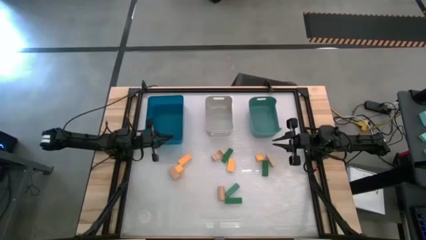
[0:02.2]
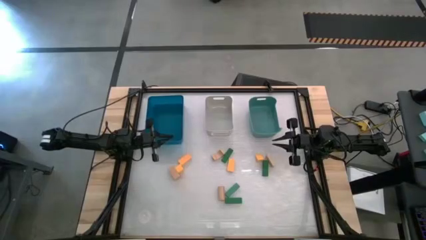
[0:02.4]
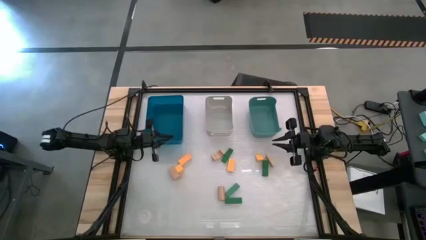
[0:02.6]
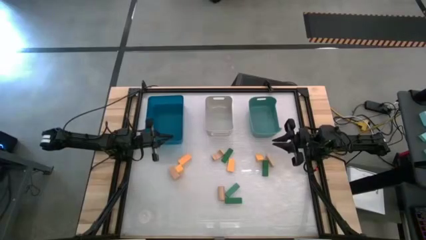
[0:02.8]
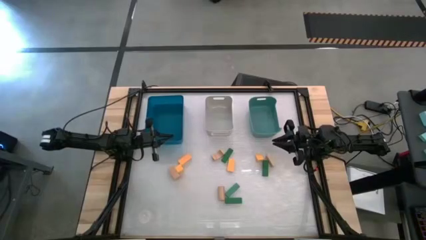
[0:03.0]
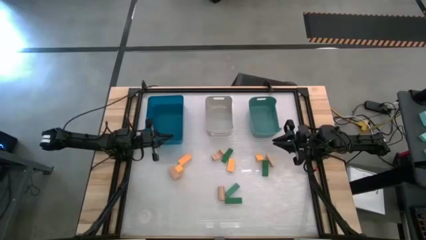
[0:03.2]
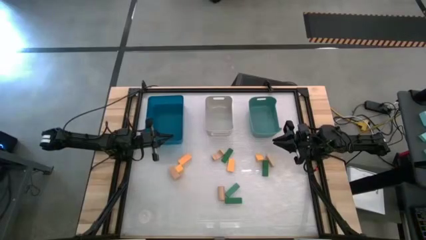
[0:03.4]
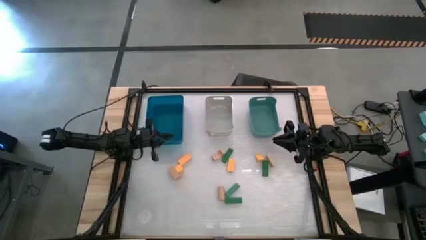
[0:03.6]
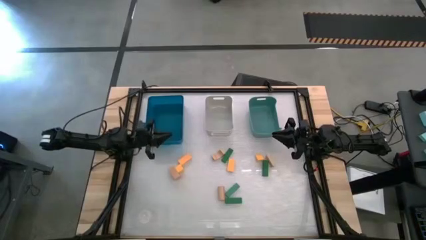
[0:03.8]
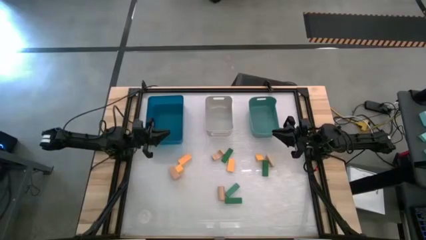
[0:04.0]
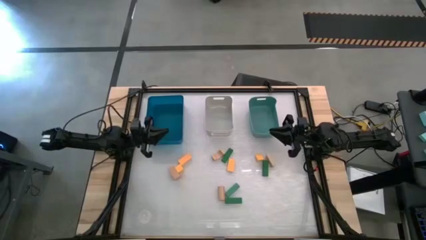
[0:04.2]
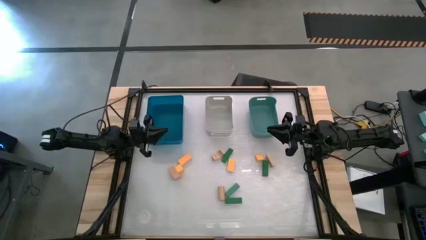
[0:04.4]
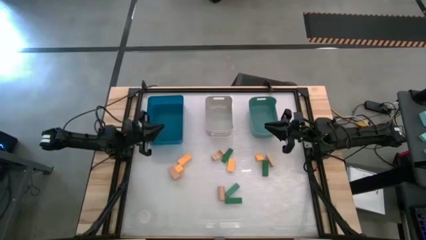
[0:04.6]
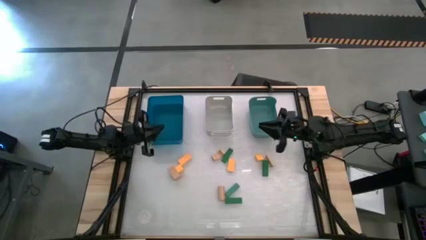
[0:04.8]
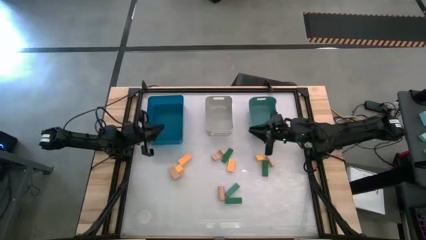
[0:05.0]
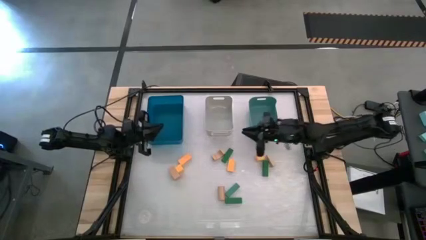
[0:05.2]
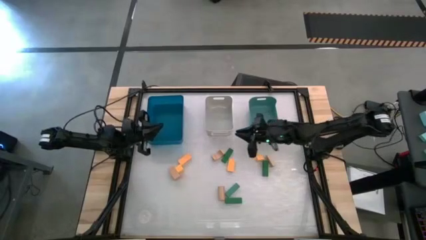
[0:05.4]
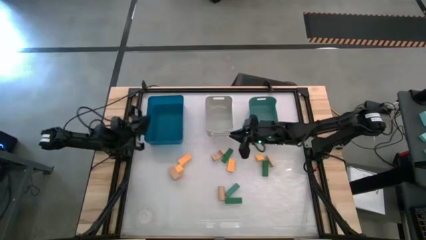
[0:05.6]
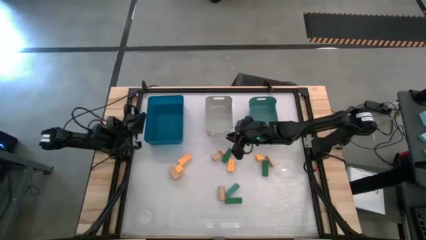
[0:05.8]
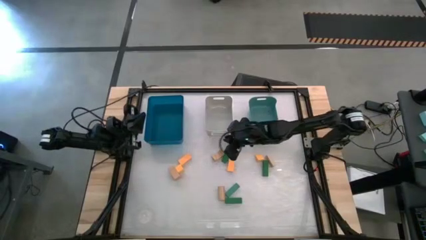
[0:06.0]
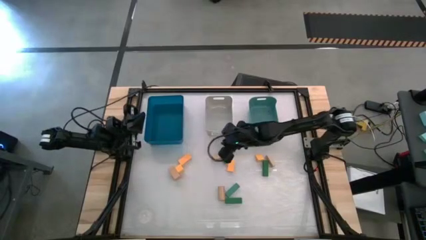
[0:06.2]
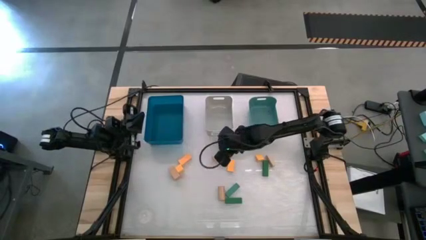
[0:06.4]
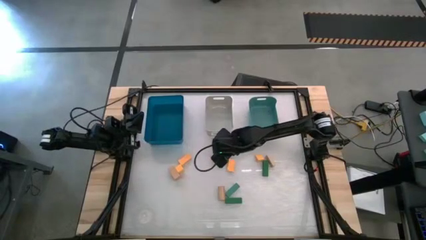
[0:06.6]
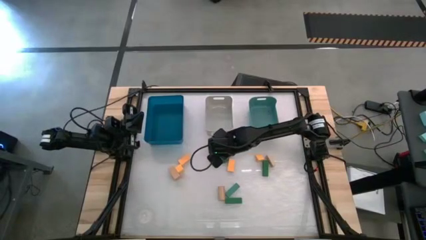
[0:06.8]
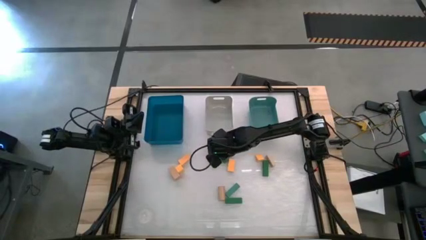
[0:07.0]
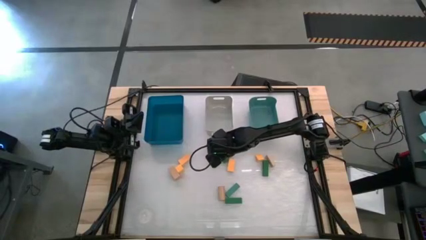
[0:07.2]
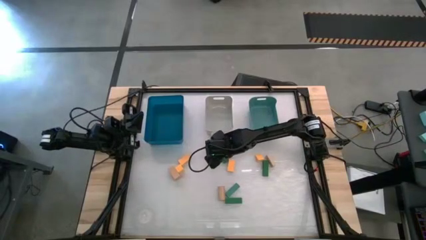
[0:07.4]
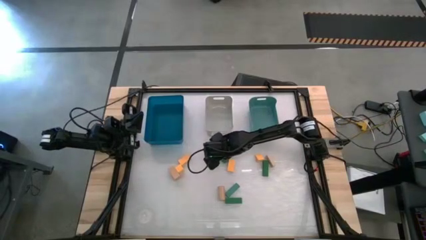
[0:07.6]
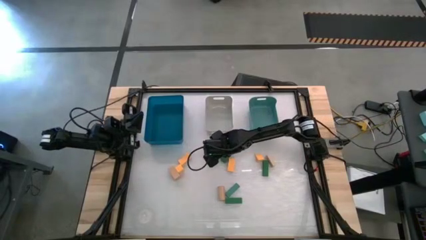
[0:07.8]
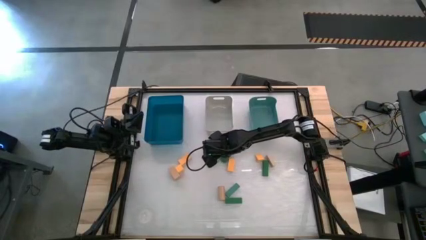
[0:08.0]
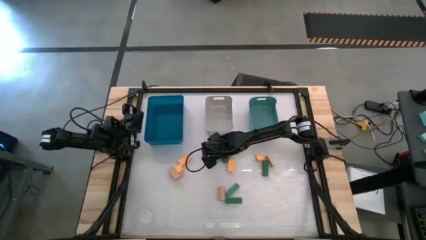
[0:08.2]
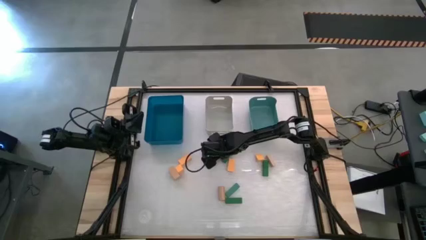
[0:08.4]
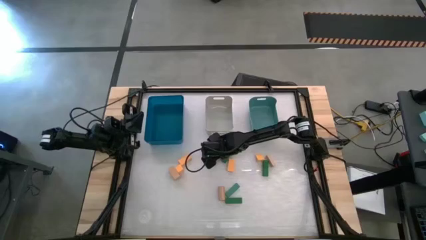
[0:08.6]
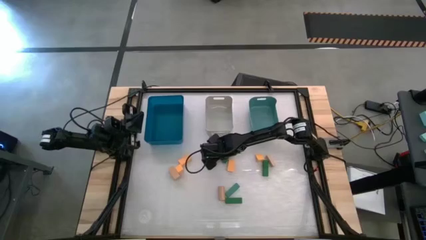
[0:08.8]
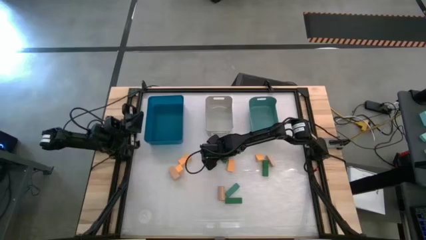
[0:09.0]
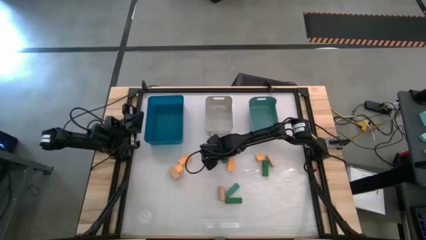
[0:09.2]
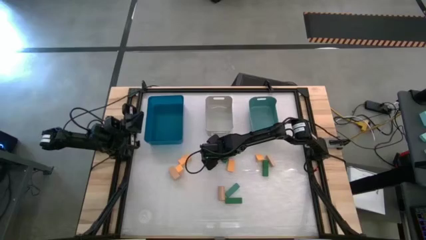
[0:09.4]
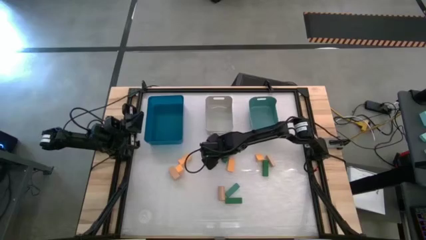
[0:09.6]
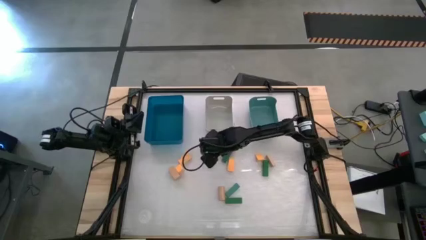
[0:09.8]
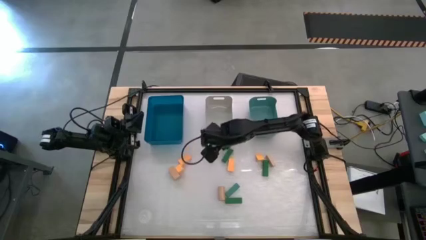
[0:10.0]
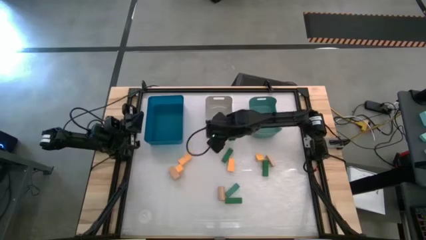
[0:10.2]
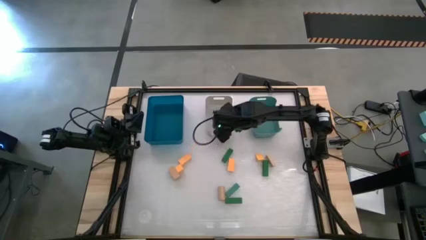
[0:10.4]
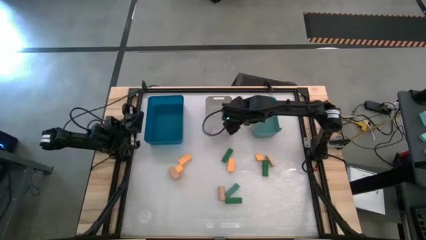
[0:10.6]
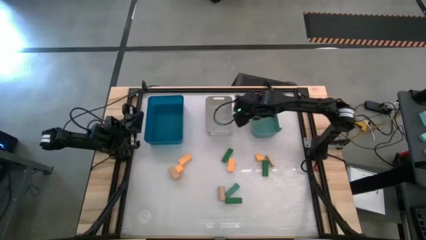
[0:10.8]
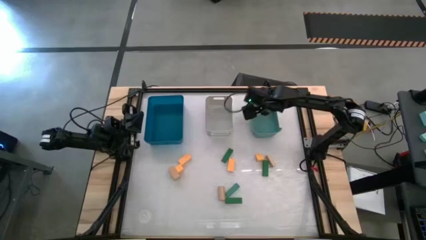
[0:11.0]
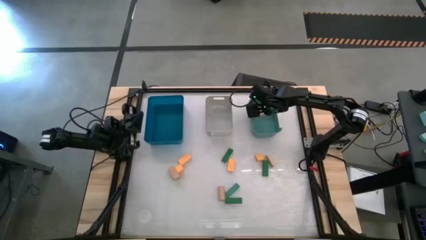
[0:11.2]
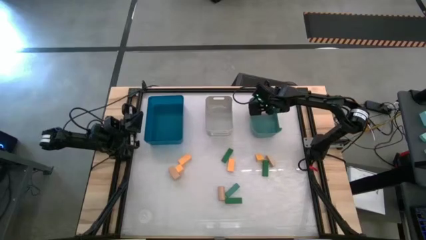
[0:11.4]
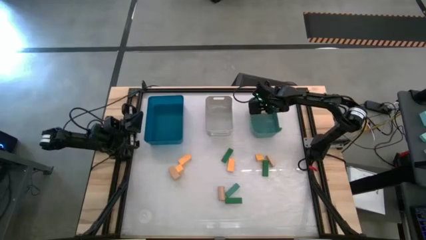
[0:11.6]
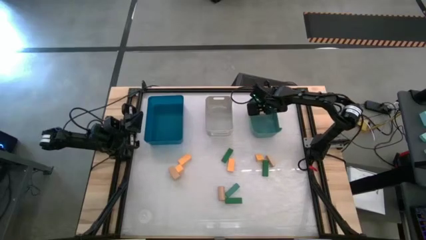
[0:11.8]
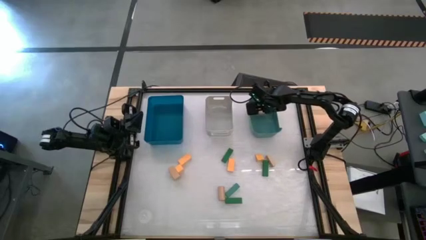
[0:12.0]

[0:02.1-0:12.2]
Task: Sort & place blocks by color
Put the brown block into the green bin

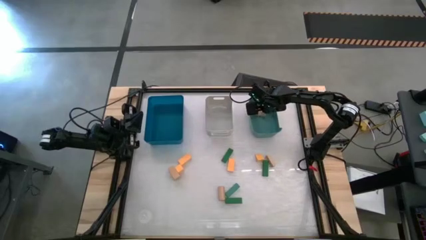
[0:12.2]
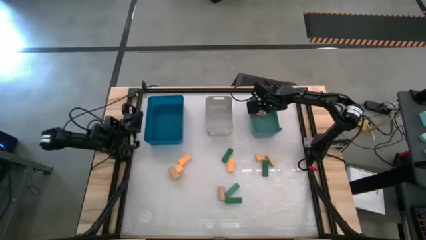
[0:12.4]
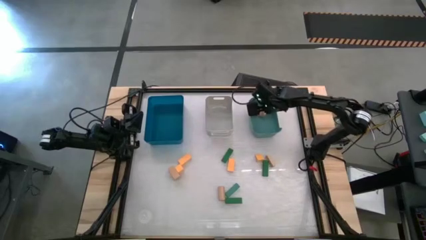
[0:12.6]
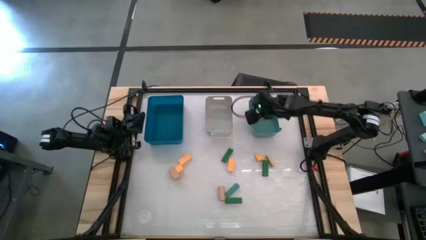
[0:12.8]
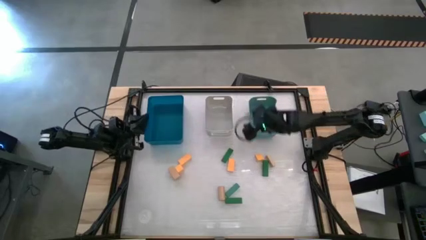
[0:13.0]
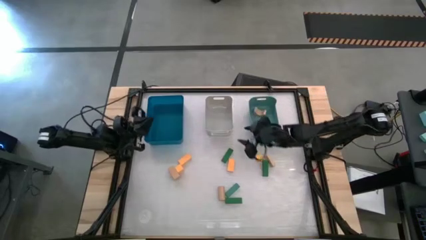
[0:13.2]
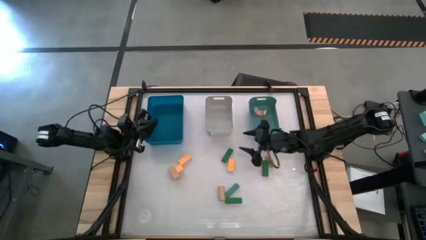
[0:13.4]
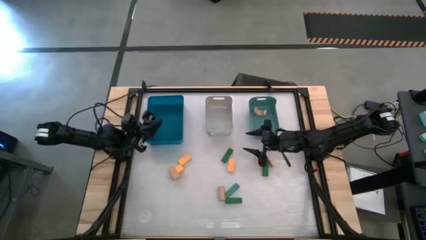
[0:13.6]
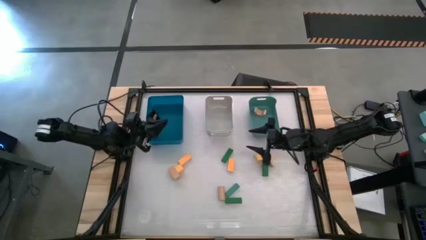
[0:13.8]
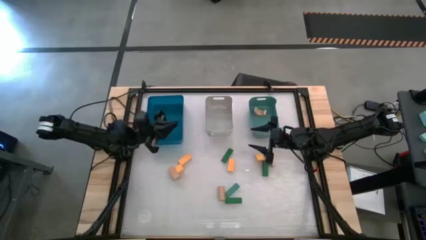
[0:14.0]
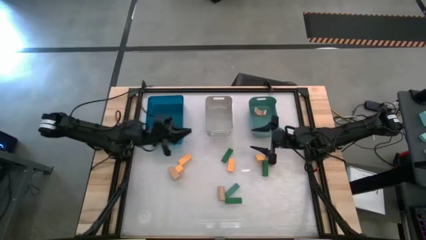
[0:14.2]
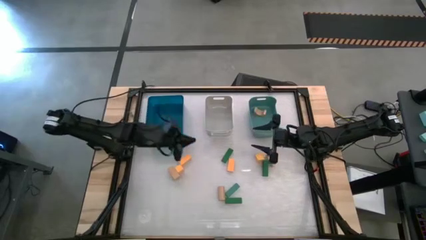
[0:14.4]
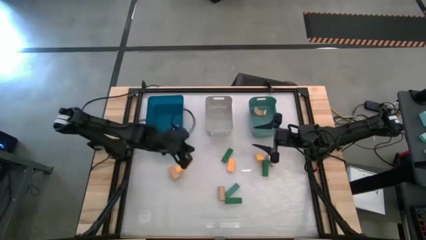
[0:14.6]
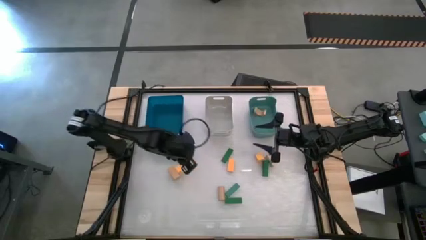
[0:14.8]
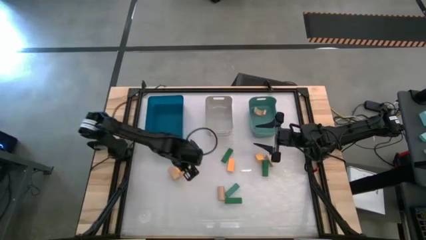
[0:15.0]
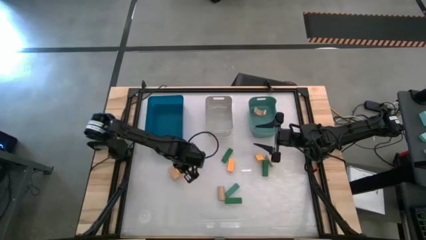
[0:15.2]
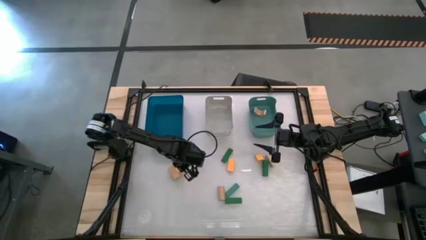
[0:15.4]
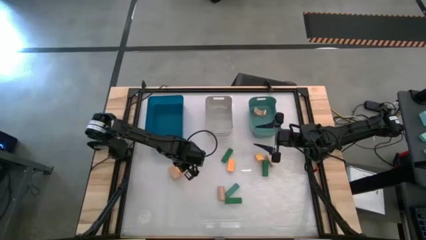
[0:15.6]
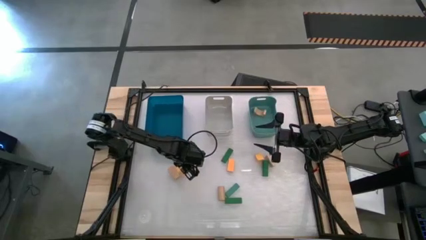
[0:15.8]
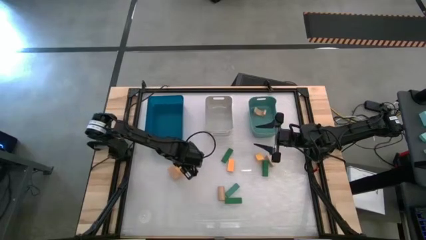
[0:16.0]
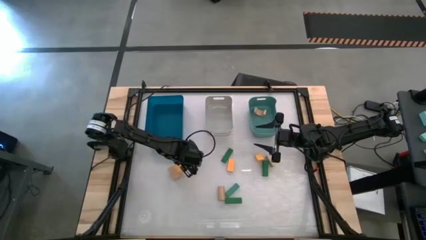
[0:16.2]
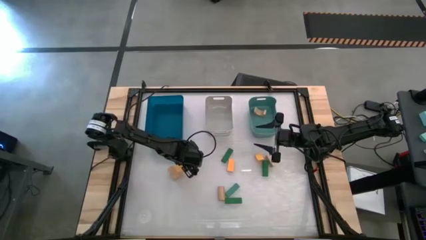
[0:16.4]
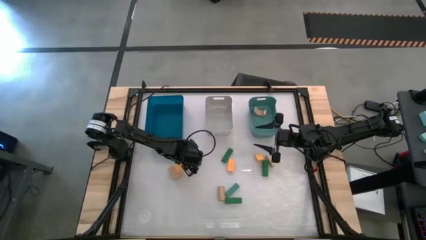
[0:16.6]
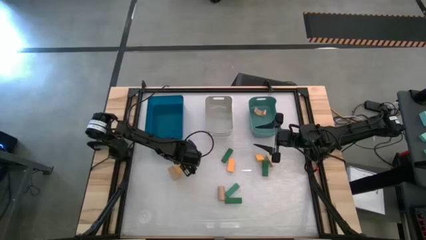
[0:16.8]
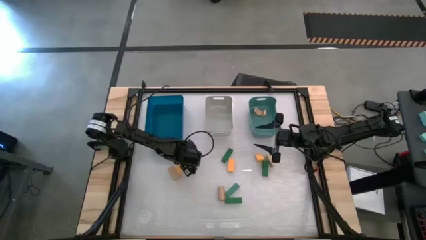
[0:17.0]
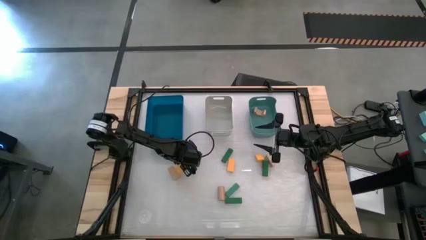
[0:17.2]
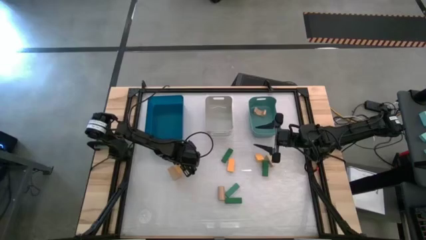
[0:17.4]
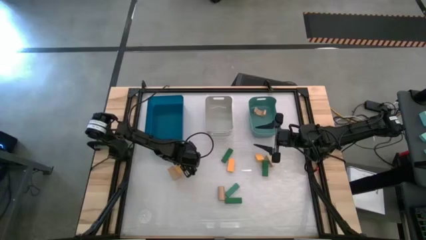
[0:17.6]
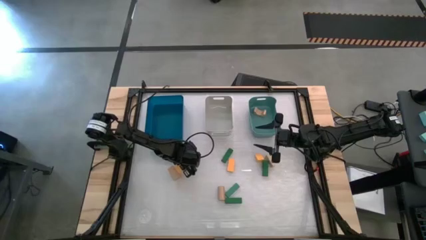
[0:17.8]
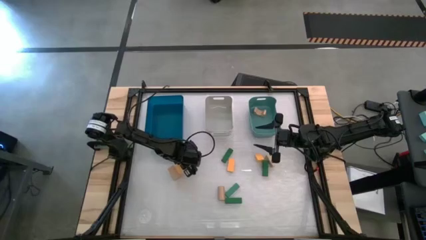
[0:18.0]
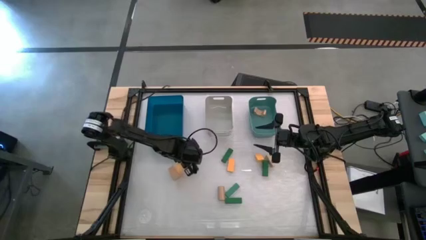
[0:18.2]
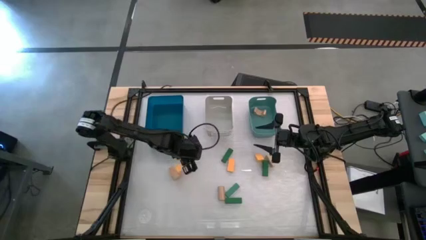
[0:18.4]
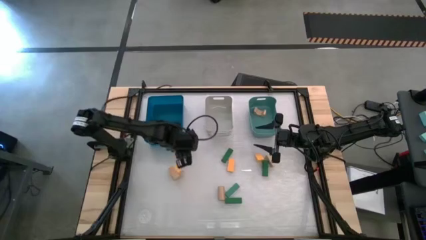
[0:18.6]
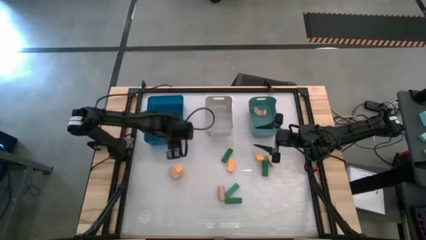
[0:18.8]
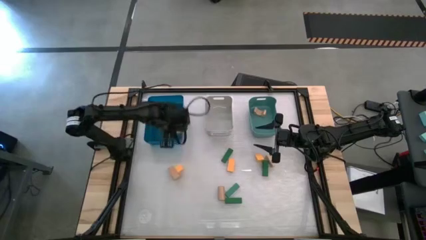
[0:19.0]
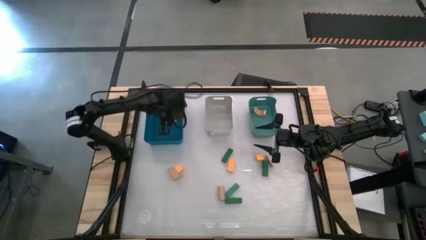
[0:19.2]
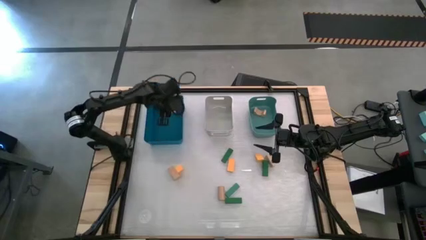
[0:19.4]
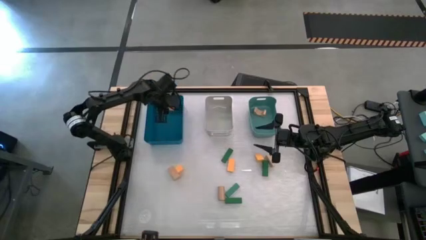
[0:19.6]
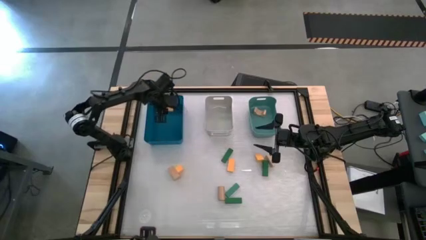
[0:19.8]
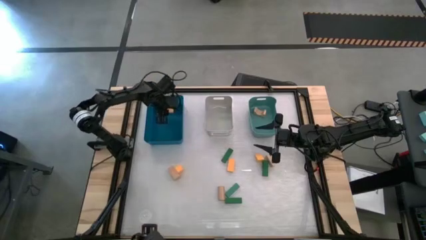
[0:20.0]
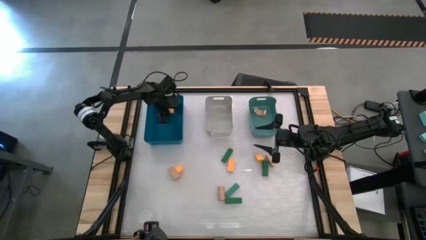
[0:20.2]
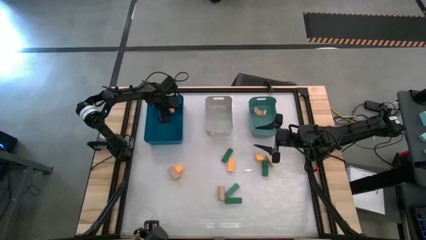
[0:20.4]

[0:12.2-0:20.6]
Put the yellow block into the blue bin
